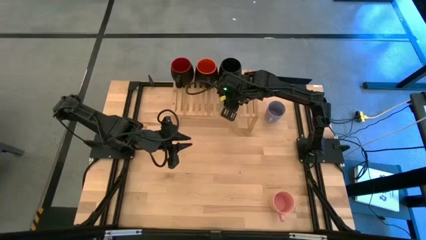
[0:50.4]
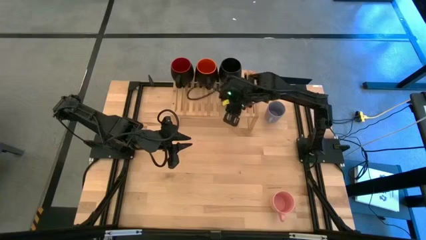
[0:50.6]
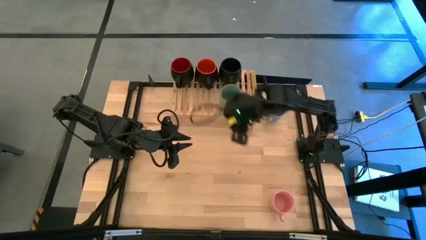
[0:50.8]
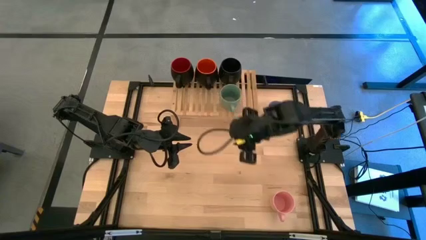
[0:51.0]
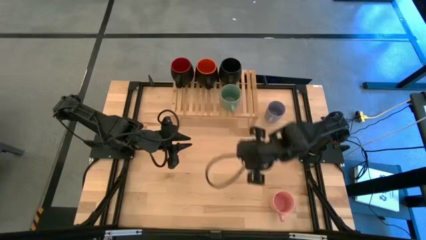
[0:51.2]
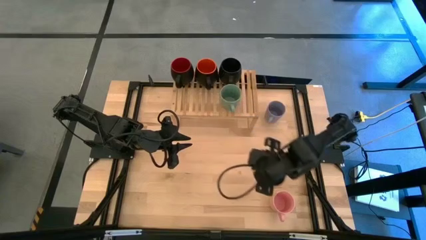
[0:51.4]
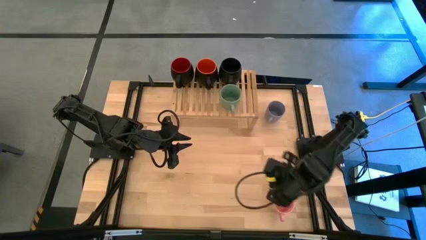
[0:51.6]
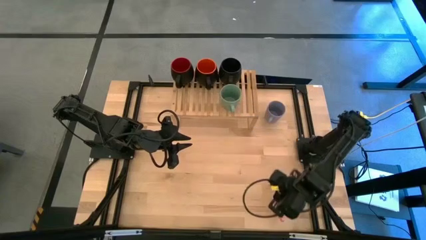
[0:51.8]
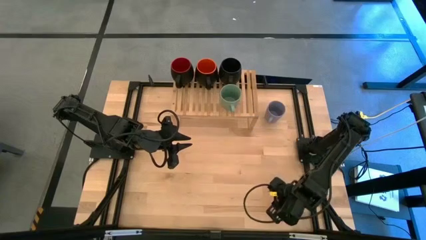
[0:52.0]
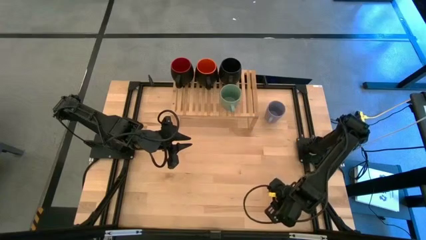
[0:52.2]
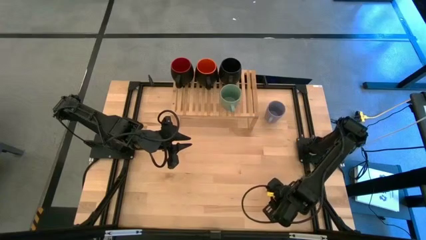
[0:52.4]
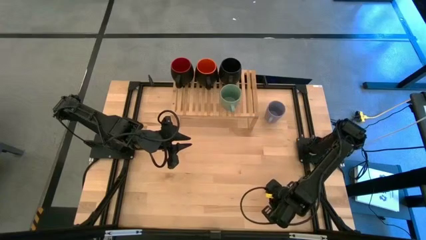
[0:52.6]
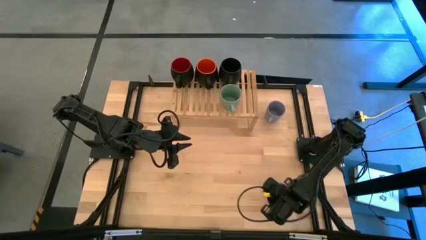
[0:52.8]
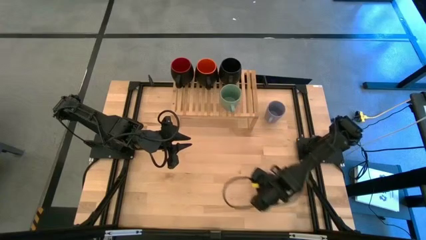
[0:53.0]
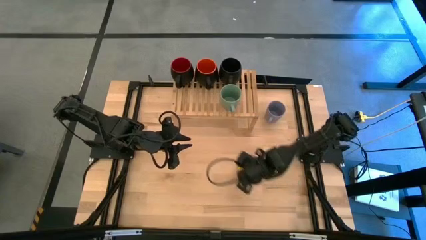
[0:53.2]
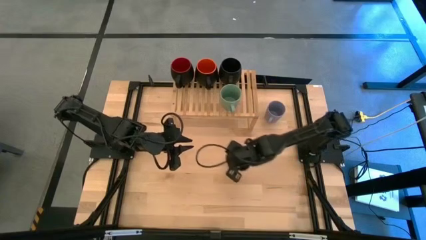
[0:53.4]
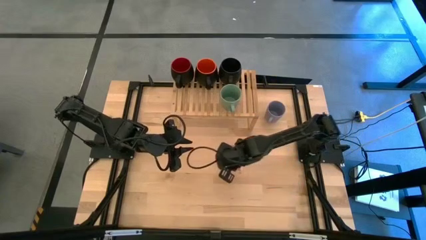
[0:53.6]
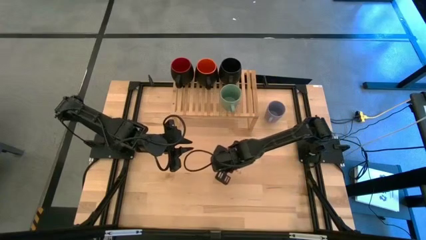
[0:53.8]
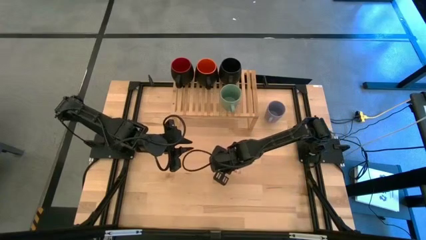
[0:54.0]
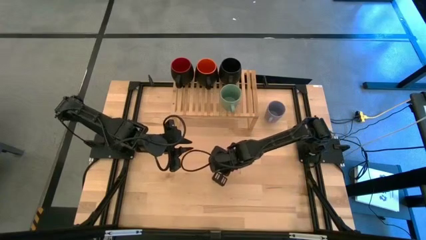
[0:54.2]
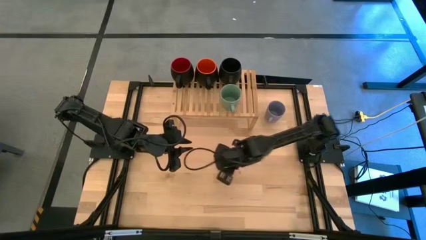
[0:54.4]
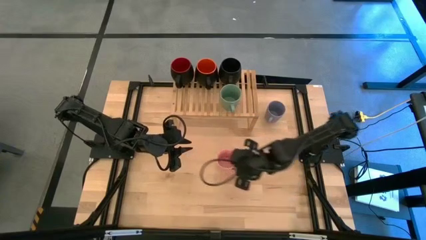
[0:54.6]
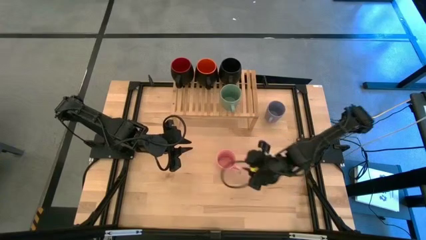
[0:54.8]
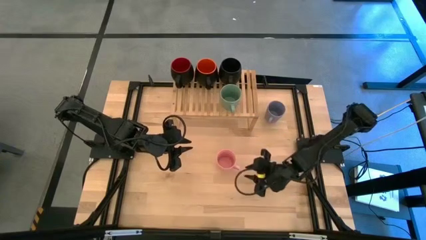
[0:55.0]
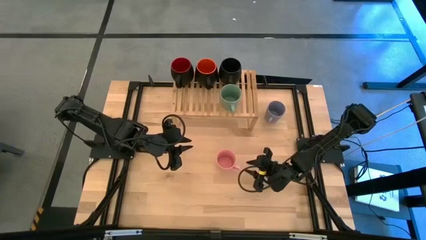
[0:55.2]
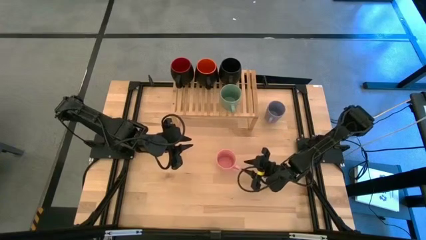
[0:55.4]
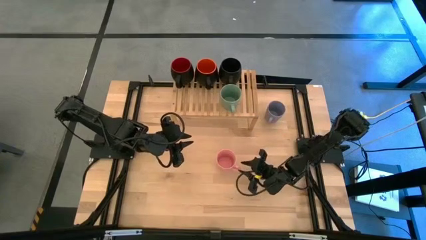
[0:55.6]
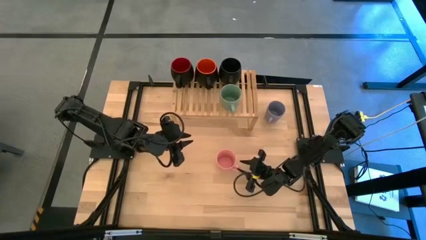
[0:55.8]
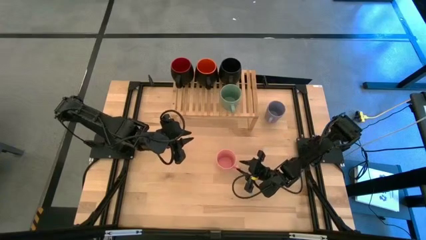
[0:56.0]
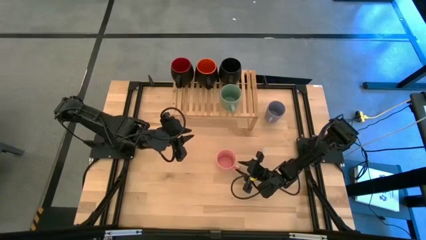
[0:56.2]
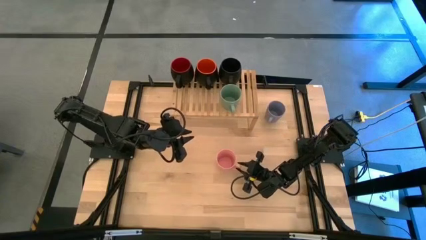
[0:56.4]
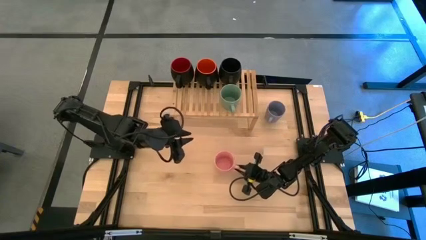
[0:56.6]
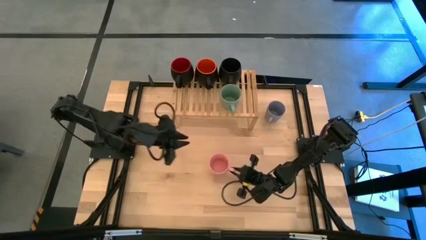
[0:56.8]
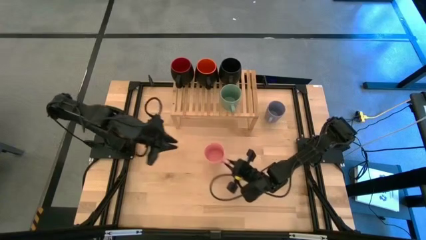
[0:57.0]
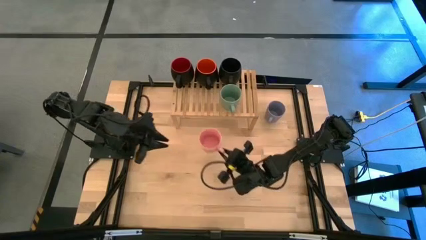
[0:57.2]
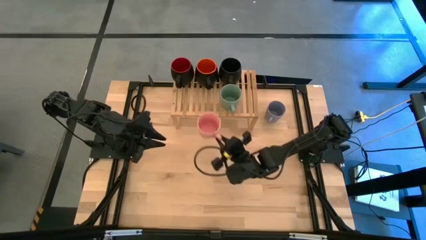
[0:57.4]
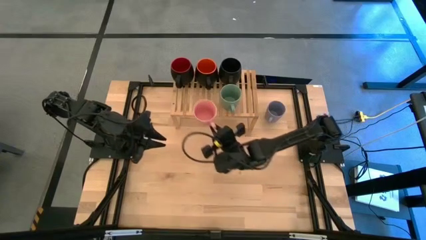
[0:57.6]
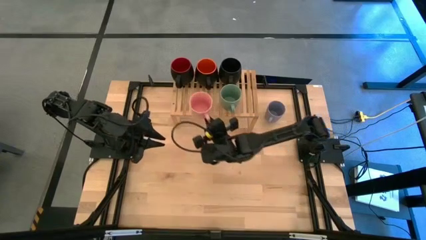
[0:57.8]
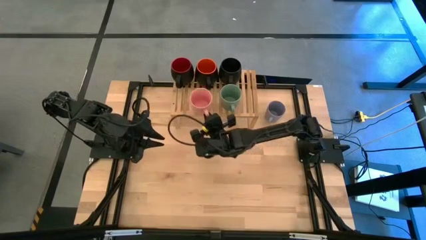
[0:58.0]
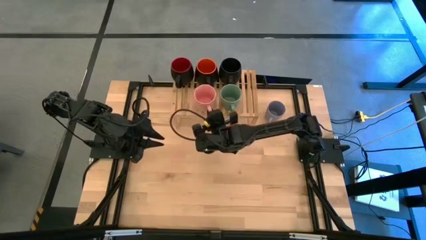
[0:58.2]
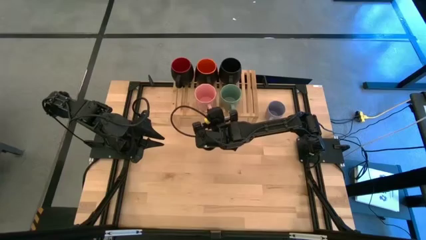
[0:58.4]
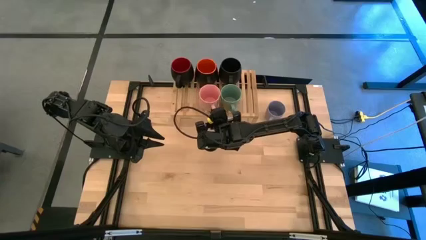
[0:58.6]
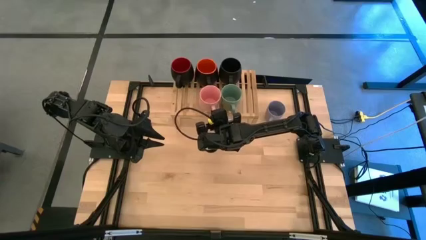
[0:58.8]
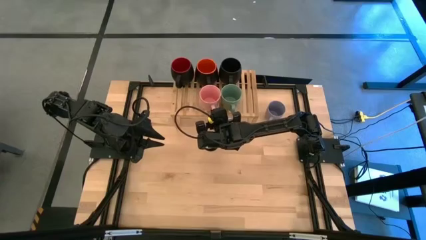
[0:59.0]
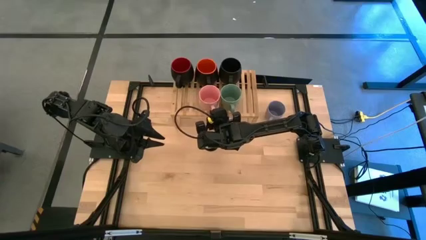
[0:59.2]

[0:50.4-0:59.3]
Task: Place coffee mugs
Put the pink mug on the shelf

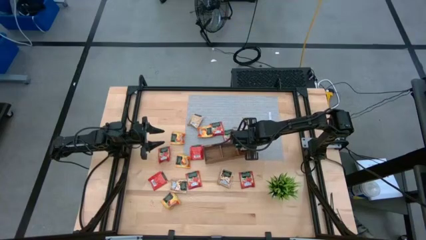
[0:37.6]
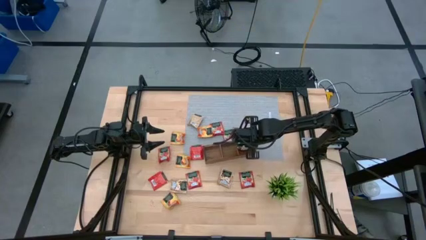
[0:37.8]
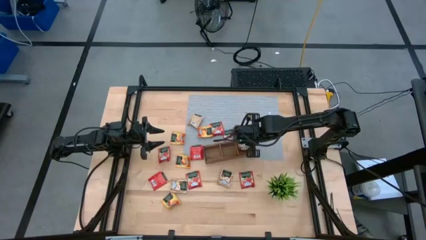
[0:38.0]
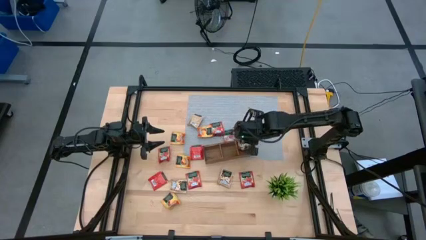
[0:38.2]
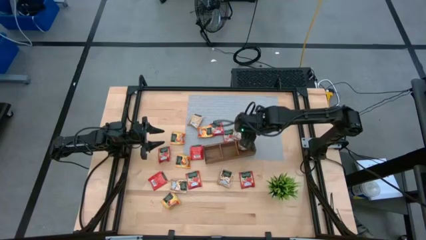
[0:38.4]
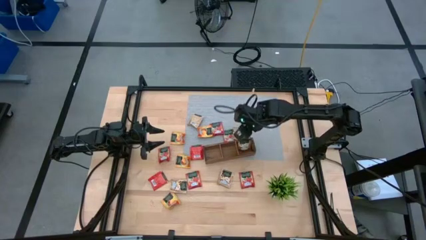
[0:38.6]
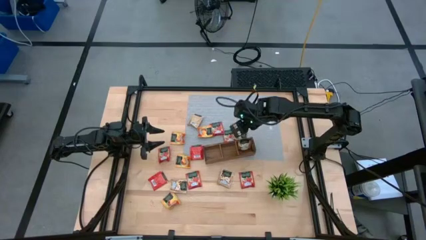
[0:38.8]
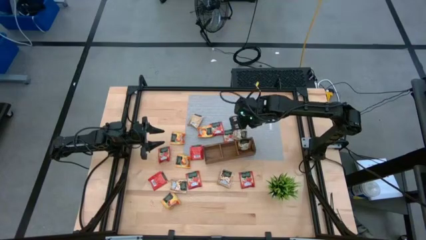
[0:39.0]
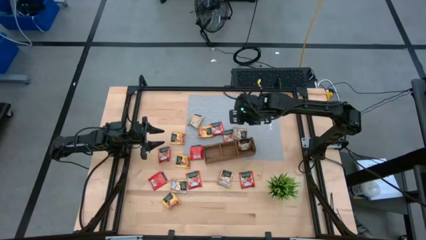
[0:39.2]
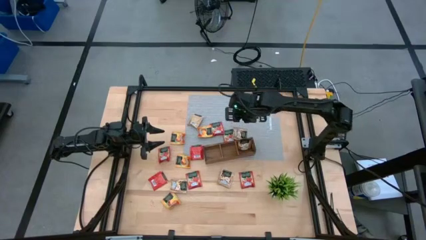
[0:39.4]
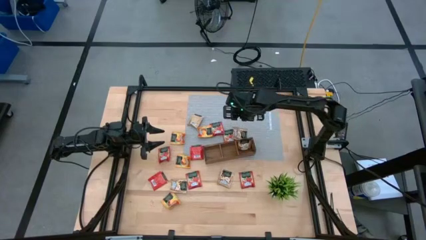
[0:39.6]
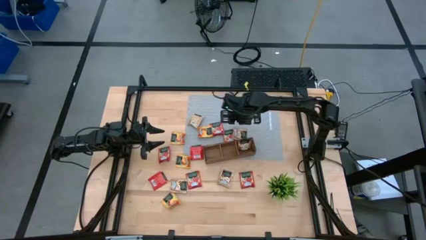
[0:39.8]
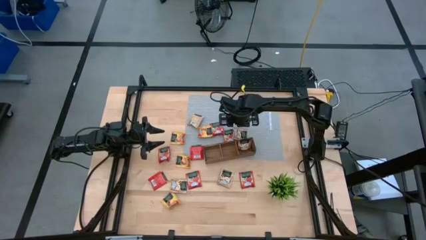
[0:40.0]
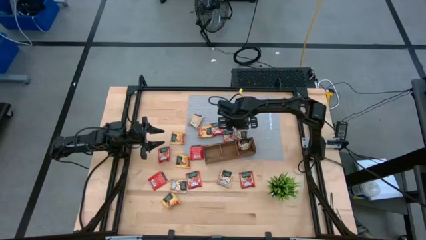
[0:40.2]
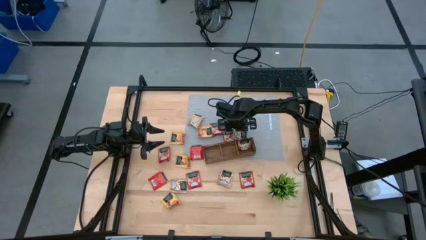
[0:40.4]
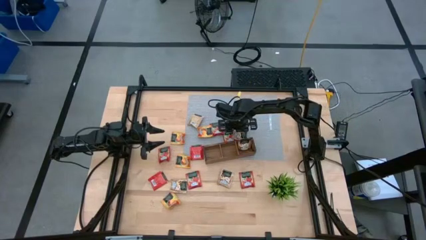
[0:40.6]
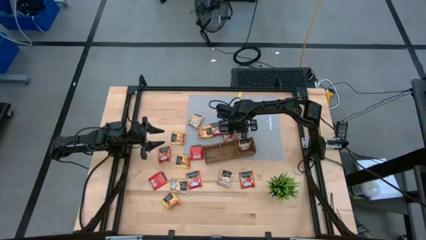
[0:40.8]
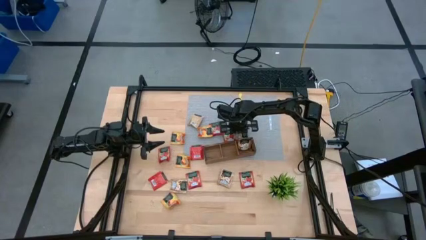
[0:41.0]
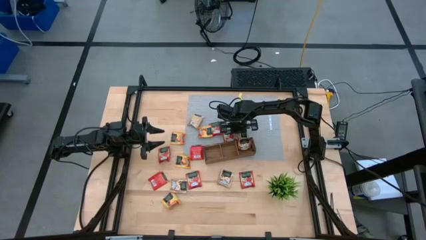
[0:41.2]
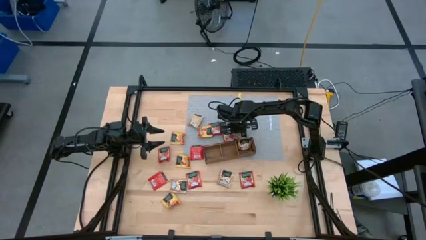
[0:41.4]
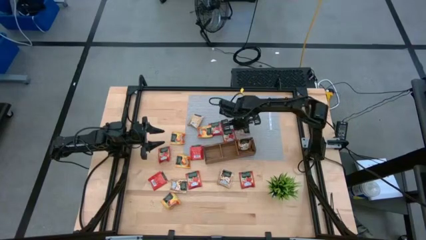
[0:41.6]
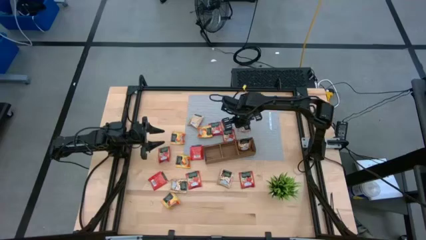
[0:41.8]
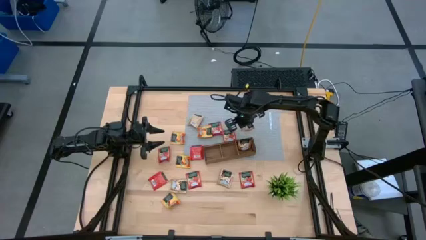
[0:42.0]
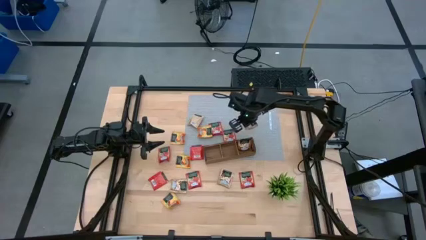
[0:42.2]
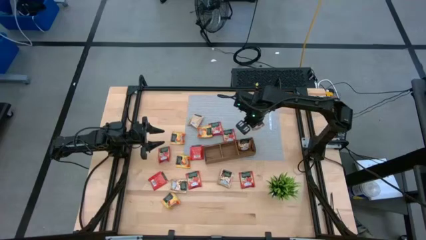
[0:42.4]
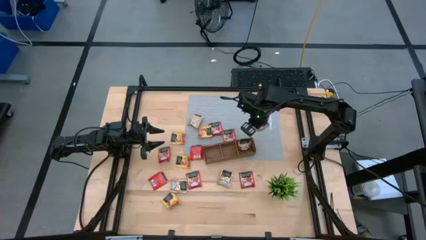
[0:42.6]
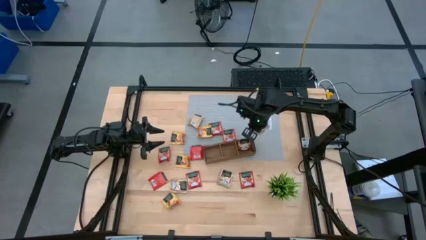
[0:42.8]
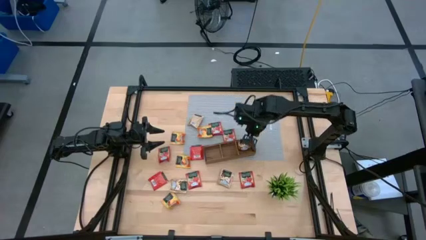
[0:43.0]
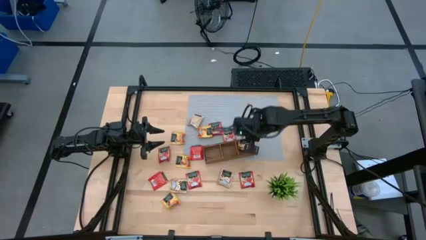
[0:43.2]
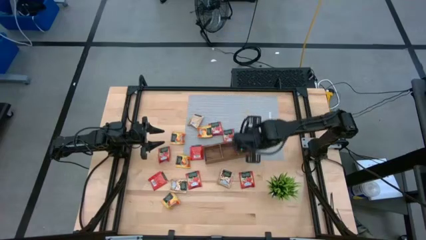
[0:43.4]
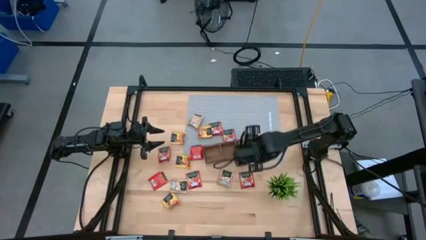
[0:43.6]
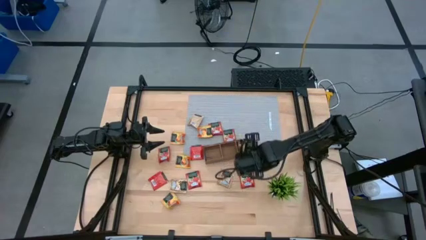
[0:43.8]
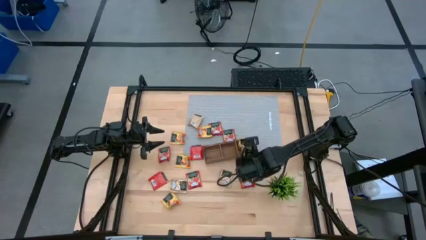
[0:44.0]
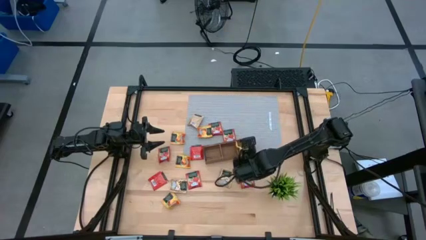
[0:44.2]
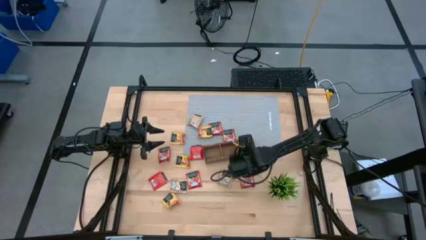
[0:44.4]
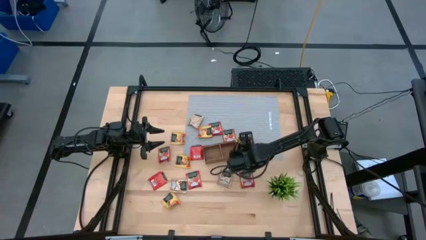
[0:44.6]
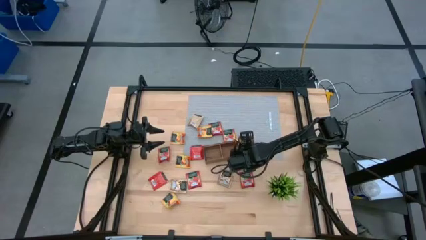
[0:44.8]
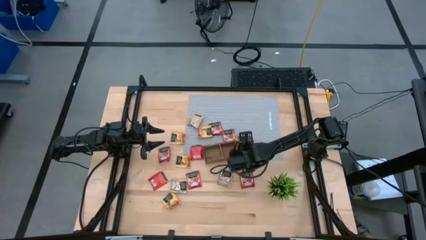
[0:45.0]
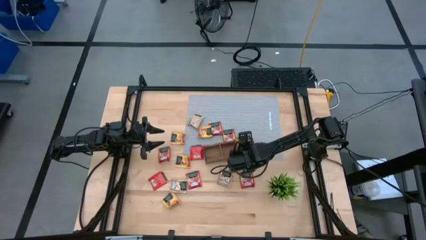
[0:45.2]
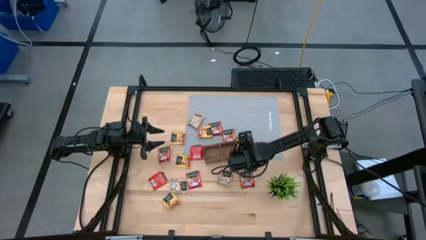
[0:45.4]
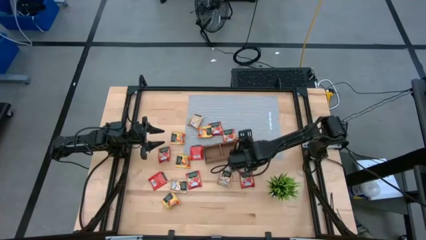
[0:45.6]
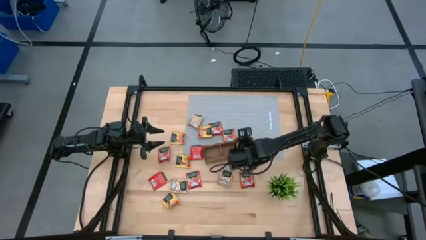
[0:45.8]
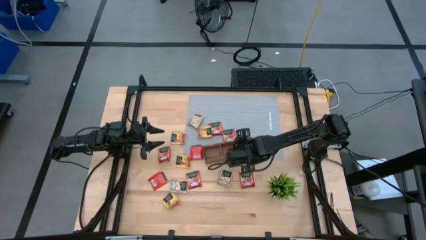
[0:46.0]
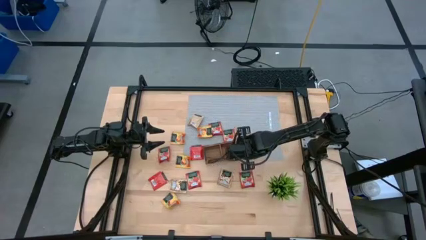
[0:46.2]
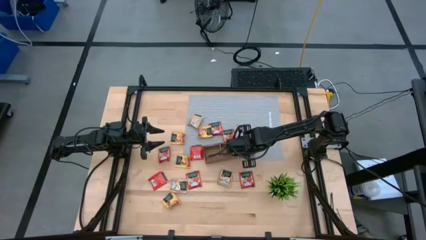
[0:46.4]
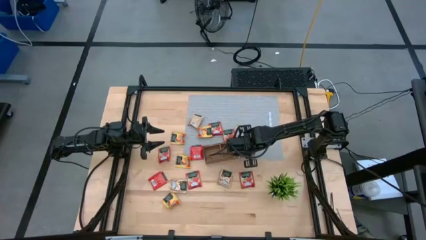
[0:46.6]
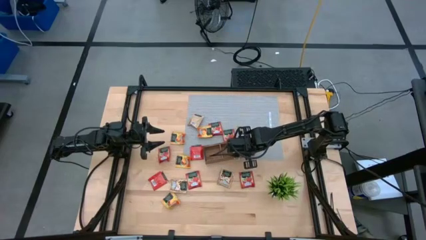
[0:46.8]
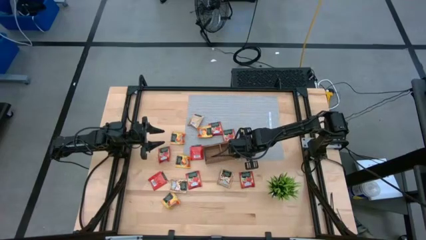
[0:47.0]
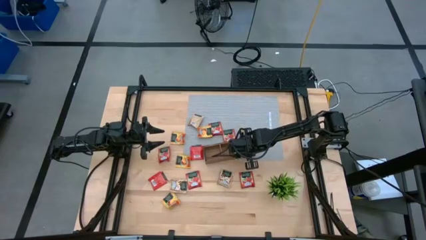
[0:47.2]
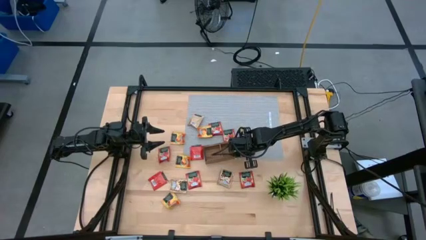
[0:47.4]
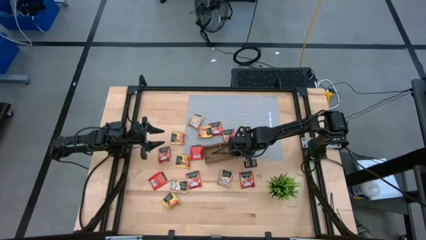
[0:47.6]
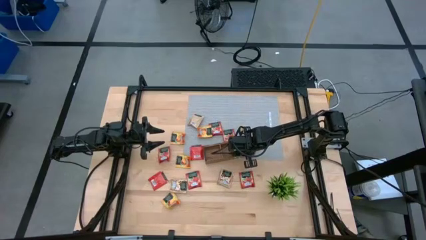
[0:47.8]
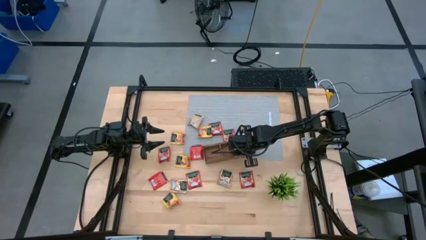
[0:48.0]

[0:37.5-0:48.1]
Task: Pick & Place Tea
Put the brown tea bag into the right section of the wooden organizer
